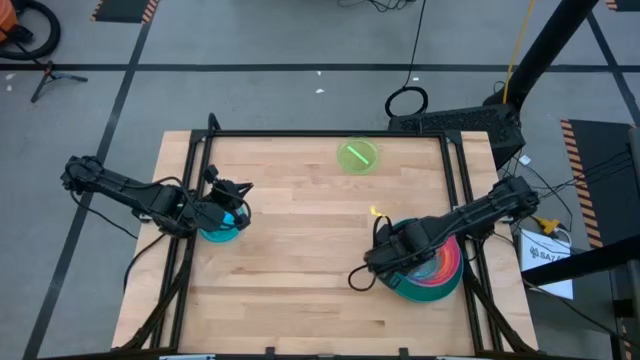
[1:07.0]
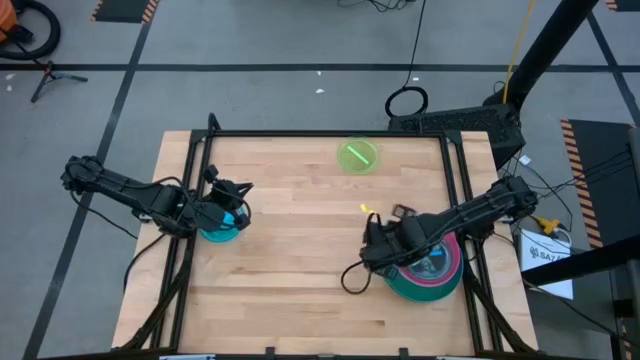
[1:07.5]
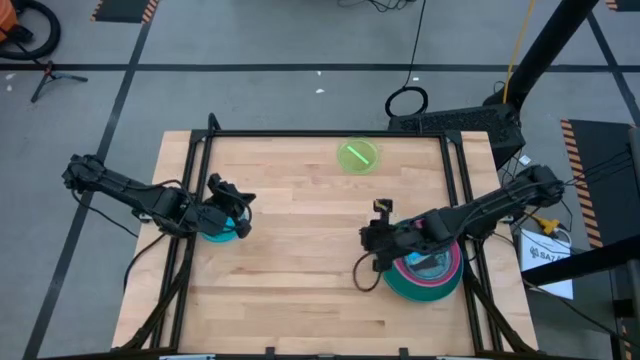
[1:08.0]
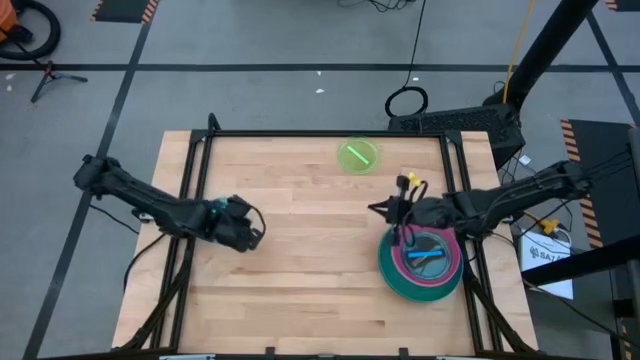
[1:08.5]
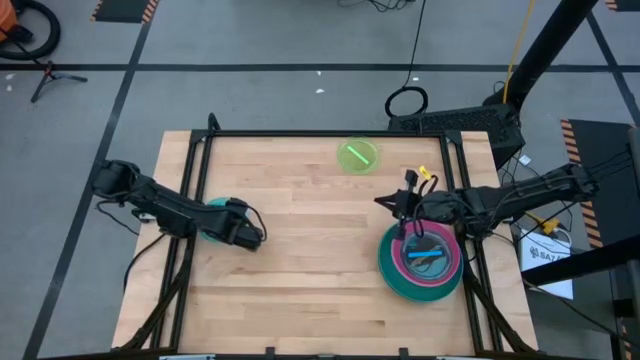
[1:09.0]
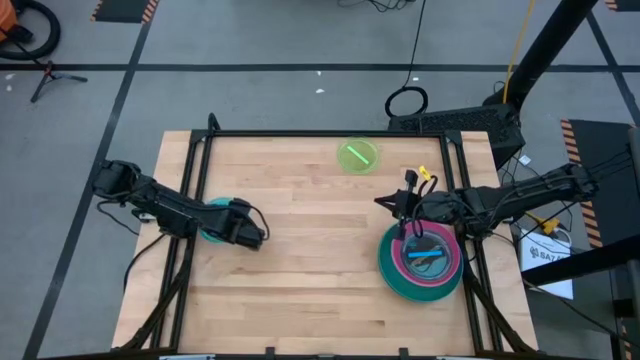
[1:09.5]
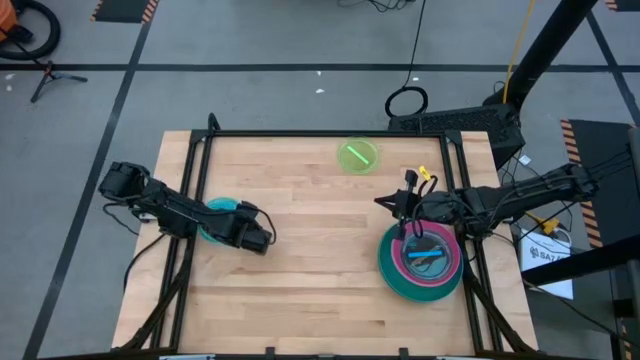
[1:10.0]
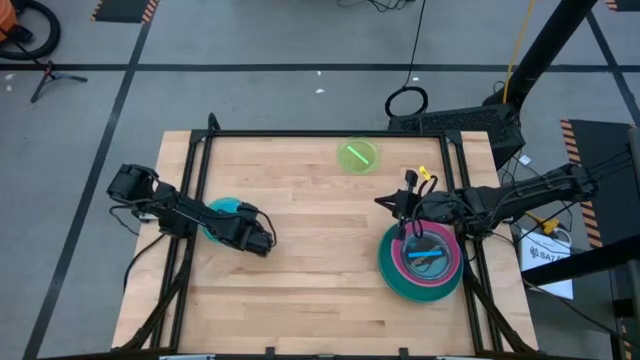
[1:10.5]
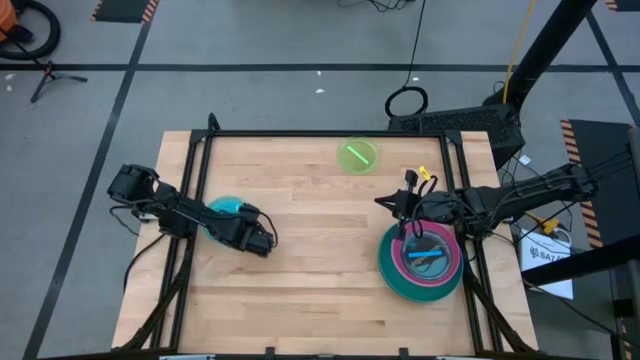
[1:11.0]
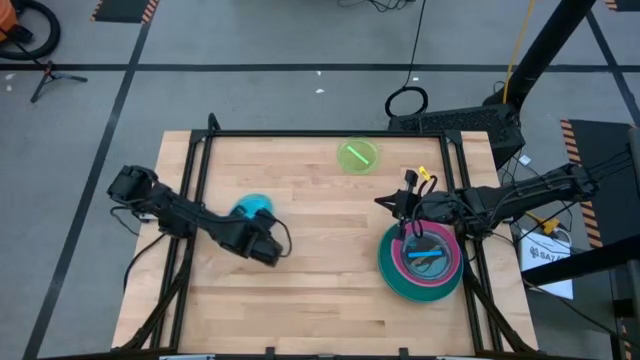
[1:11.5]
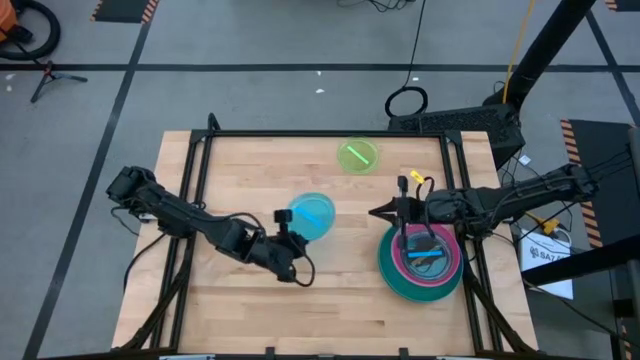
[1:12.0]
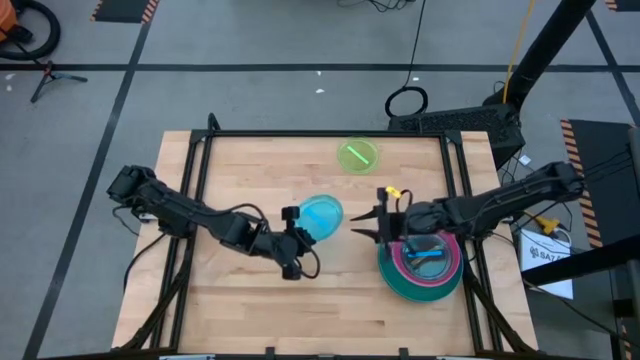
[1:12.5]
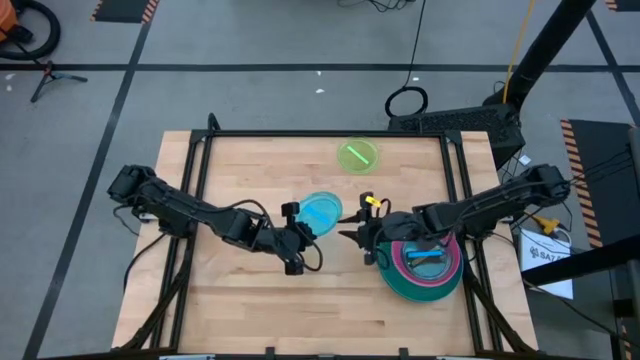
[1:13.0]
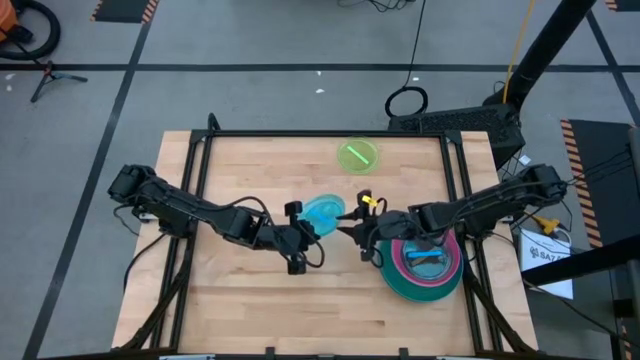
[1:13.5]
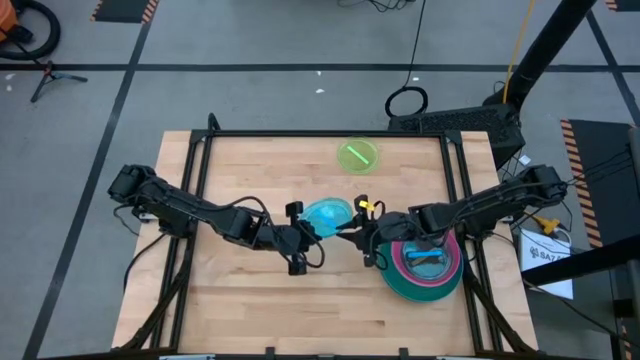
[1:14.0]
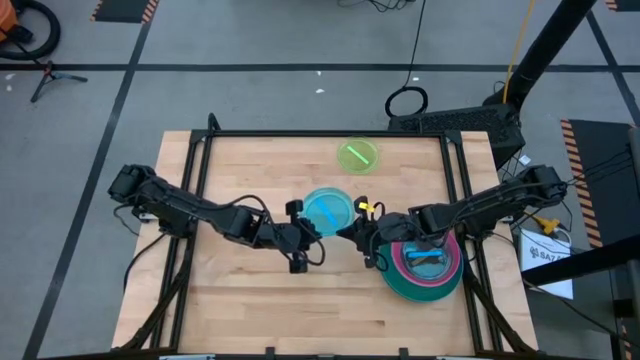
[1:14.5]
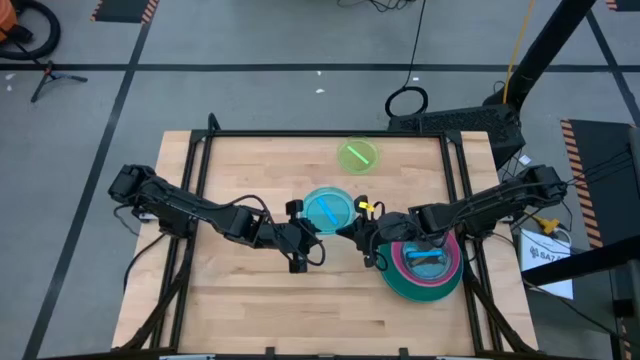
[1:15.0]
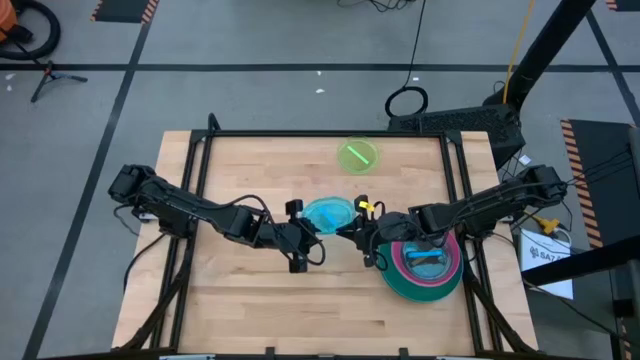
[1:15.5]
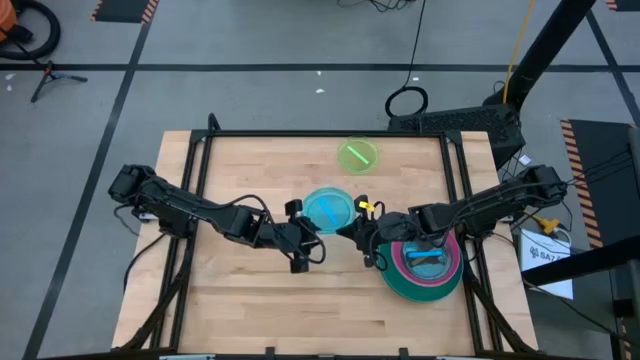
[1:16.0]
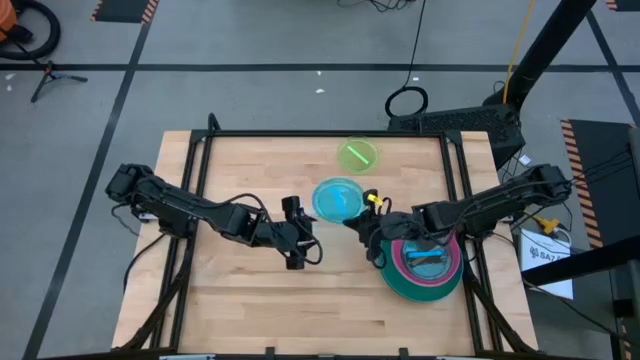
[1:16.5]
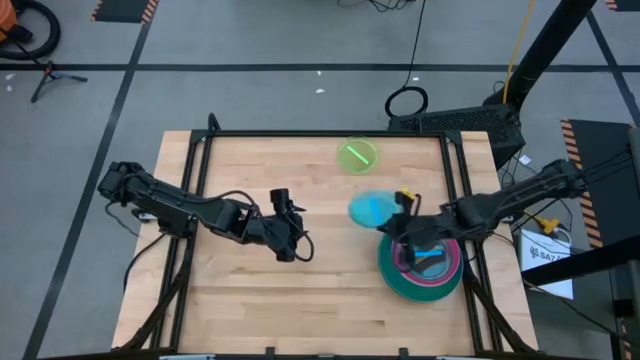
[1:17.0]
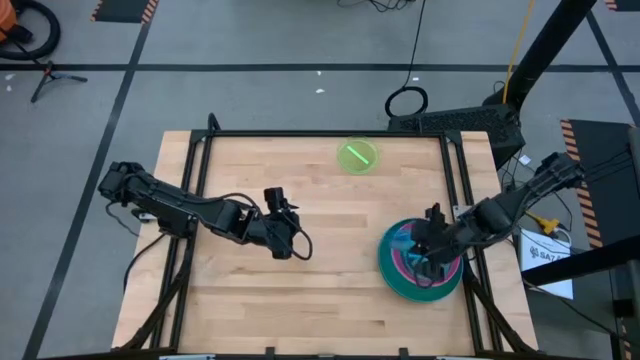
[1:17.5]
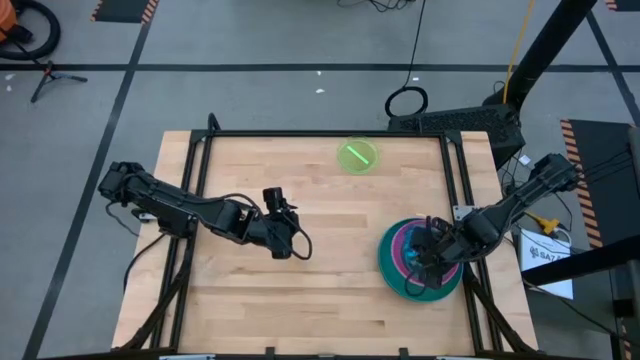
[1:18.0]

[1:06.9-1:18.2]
Task: Stack plastic plates
Stack the light blue plate on top of the light blue plate

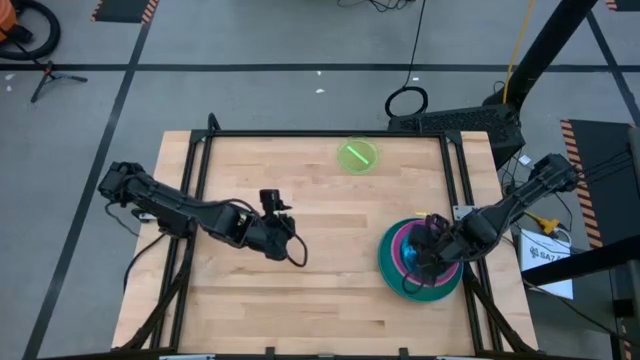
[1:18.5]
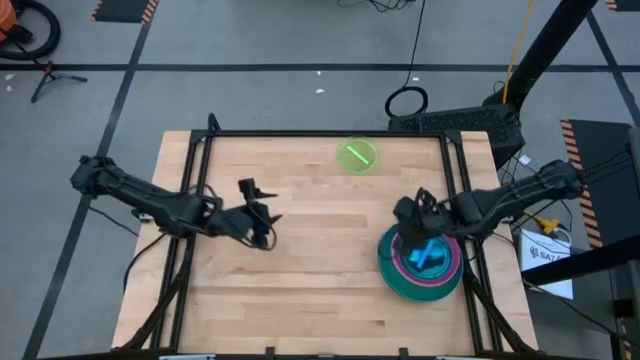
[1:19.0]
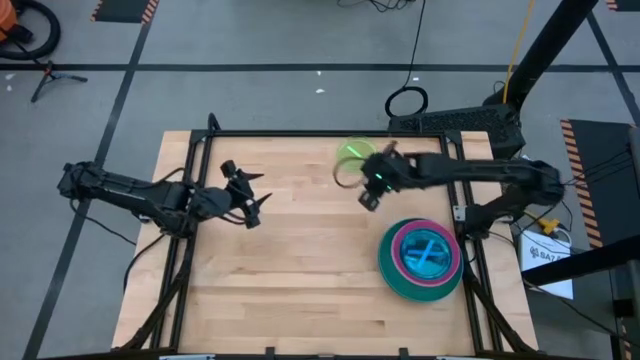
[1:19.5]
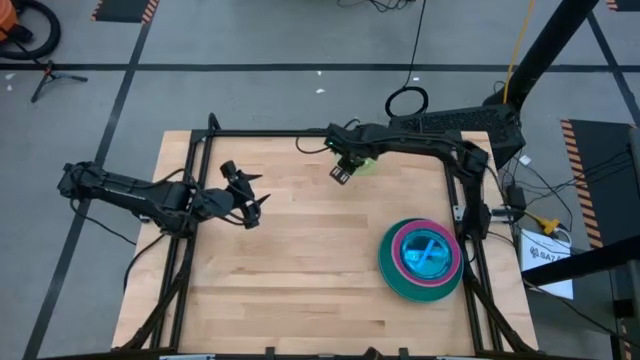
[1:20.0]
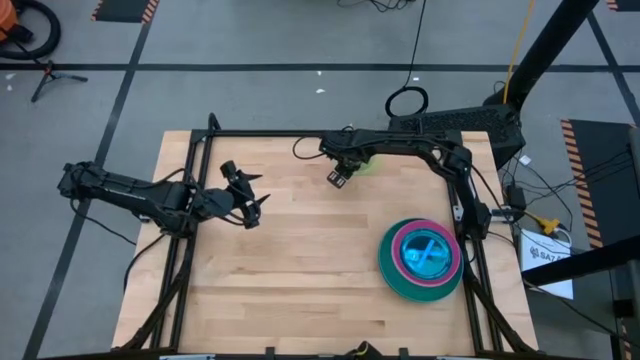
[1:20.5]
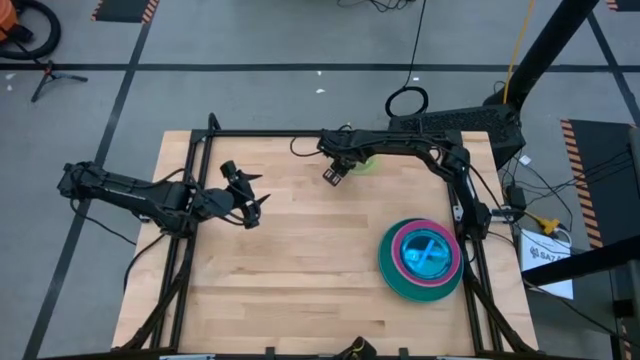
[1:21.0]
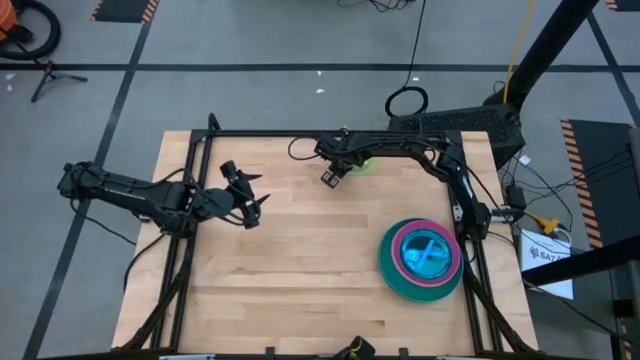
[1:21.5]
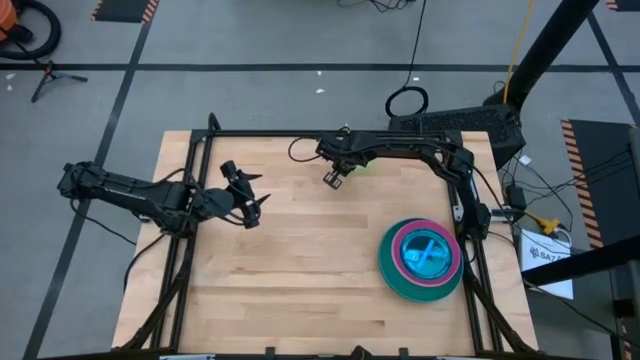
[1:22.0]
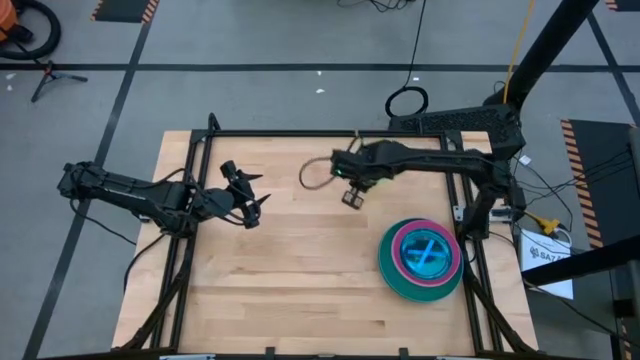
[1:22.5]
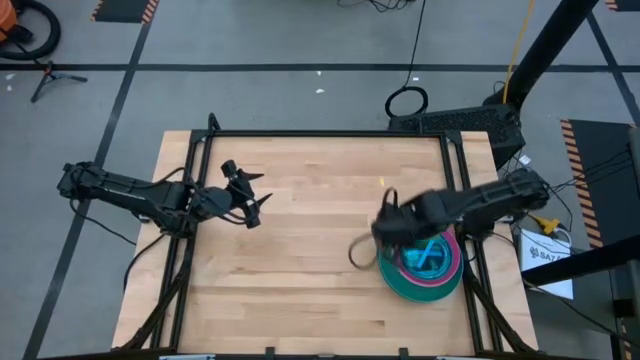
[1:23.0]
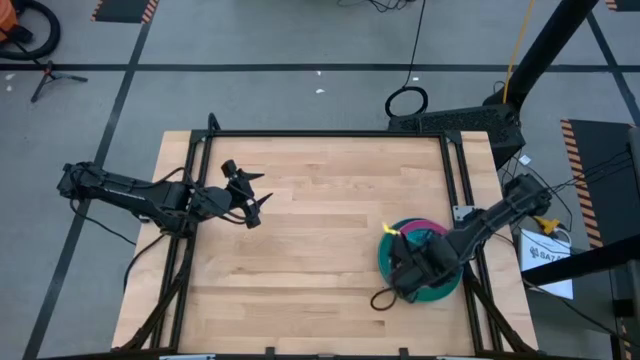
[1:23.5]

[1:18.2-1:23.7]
Stack the light green plate on top of the light blue plate

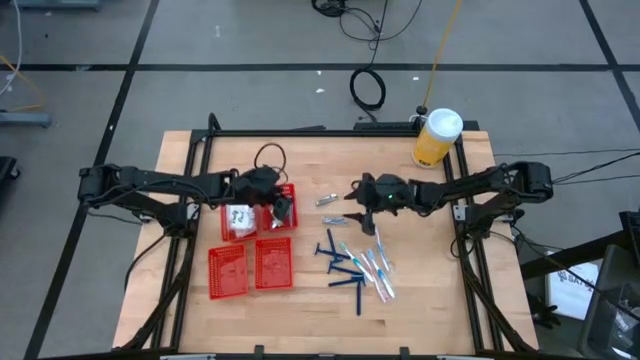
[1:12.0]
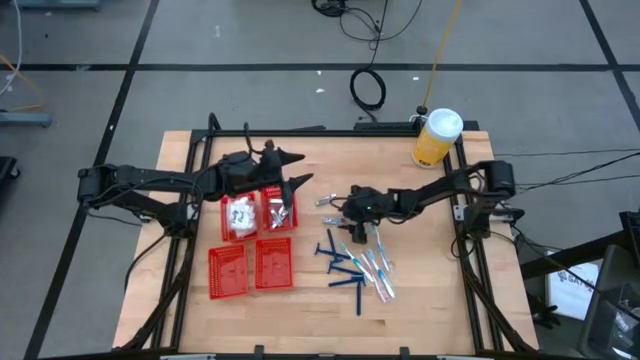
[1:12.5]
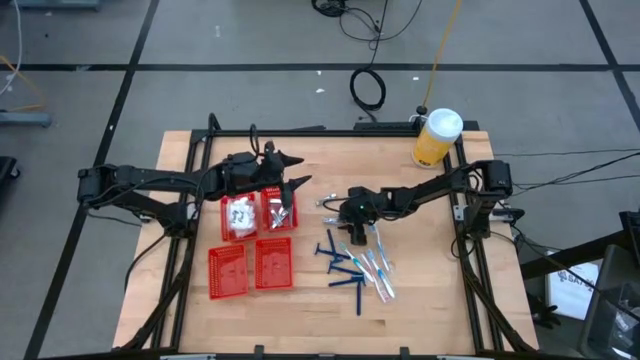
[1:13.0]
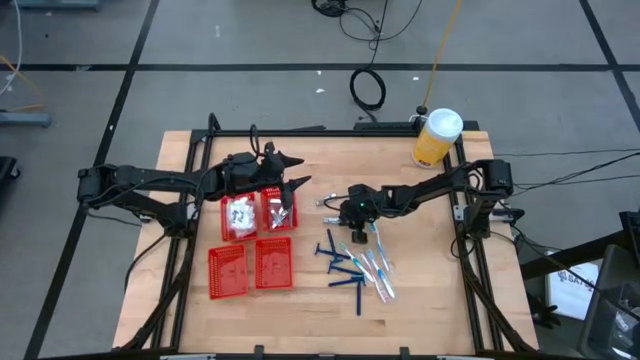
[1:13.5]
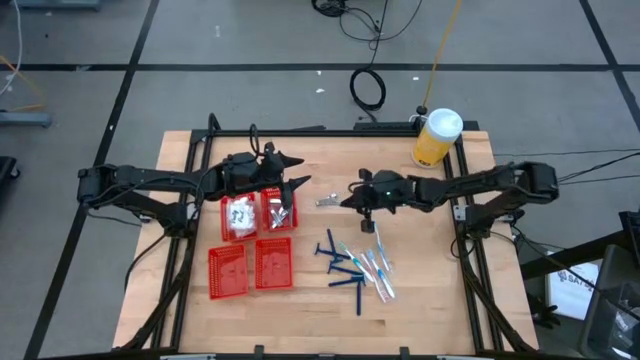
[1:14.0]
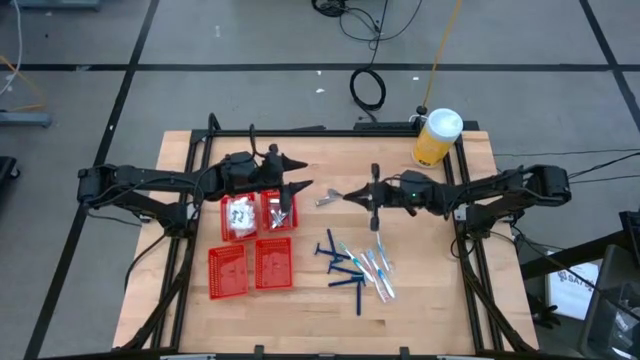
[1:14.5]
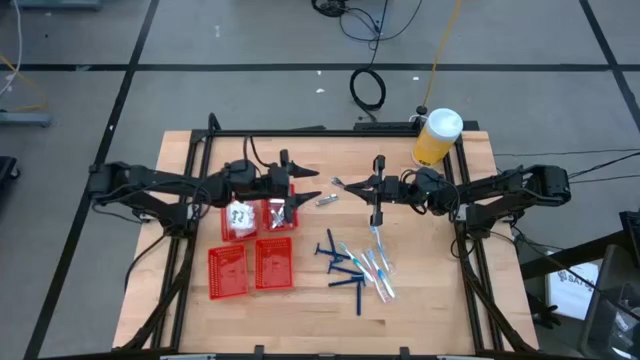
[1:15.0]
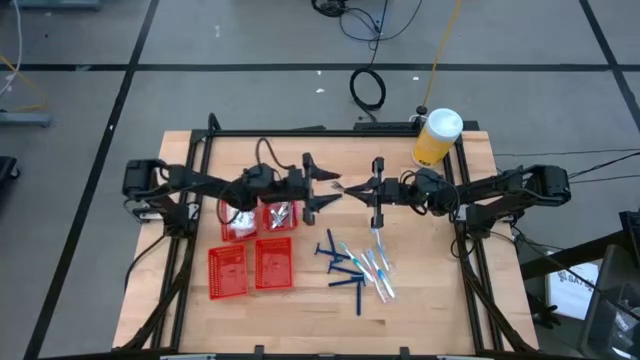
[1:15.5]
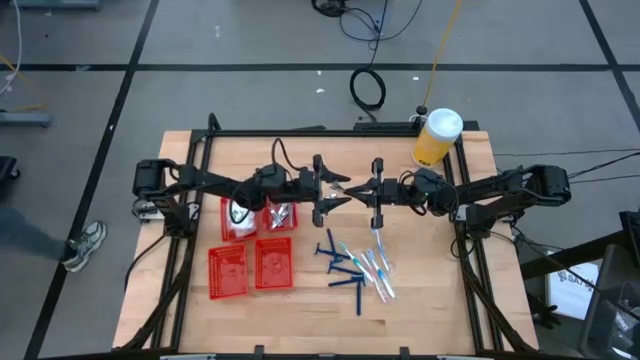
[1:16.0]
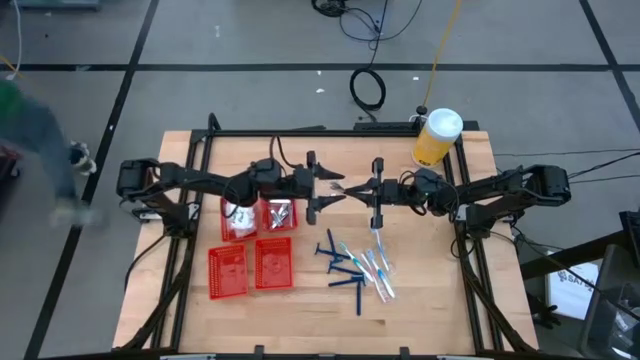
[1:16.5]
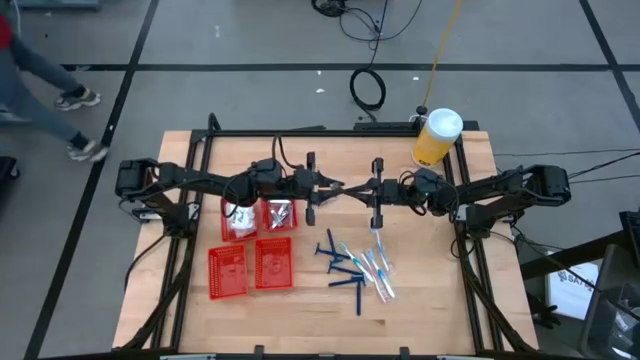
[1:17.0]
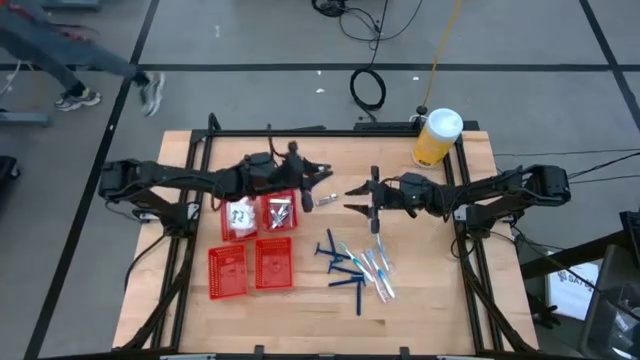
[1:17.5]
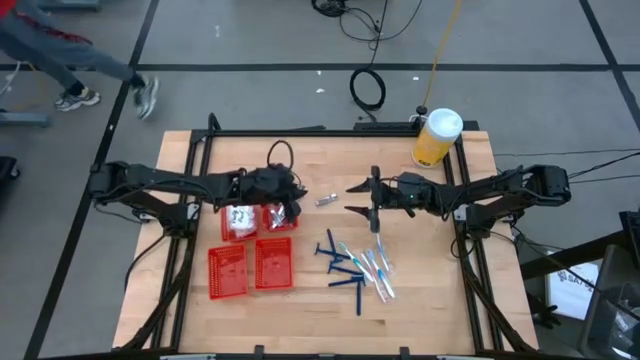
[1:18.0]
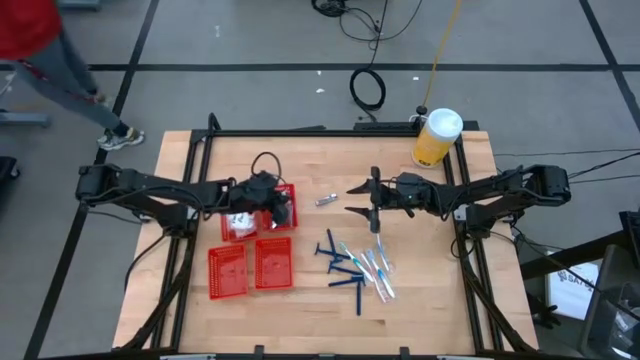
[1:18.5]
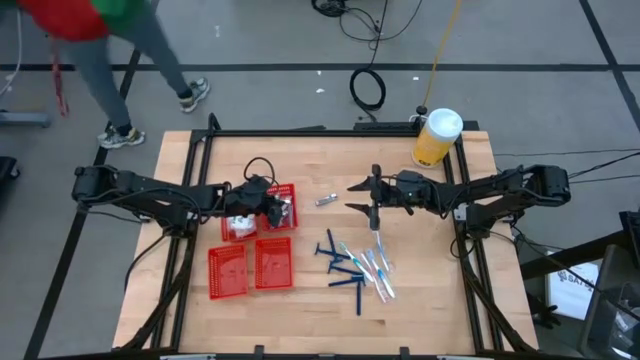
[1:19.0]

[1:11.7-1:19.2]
Task: Pick & Place Travel size toiletries
Put the silver nail cutter into the top right red basket
